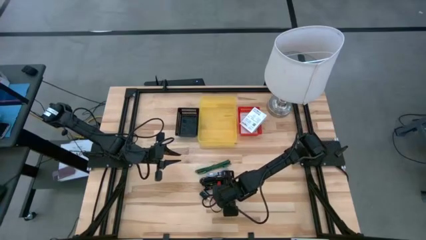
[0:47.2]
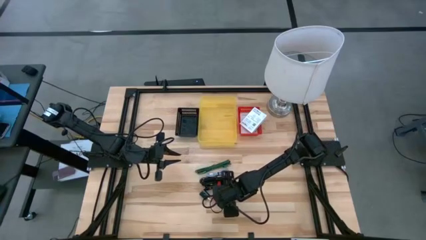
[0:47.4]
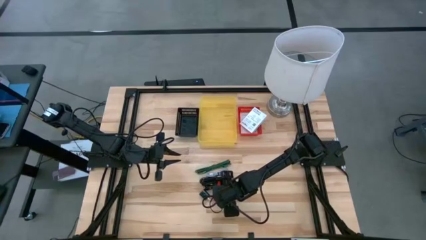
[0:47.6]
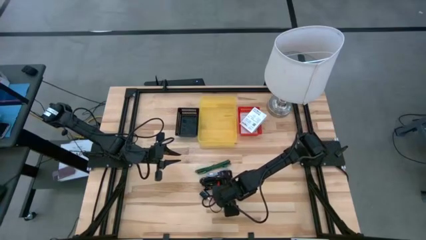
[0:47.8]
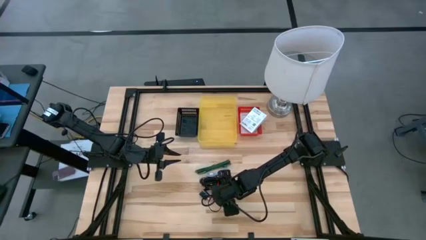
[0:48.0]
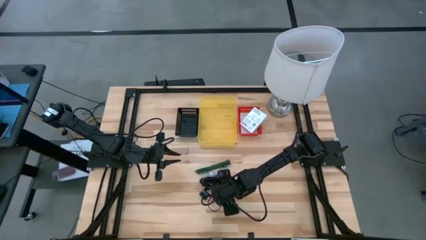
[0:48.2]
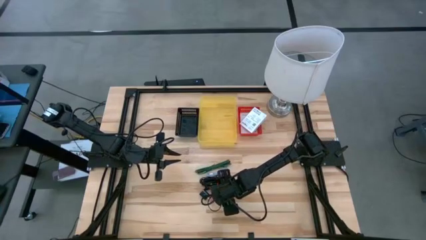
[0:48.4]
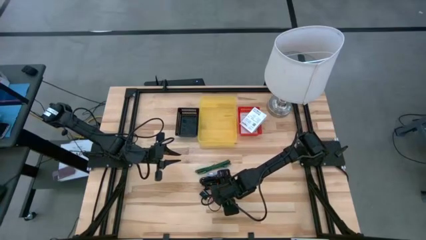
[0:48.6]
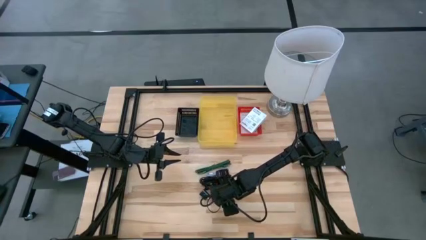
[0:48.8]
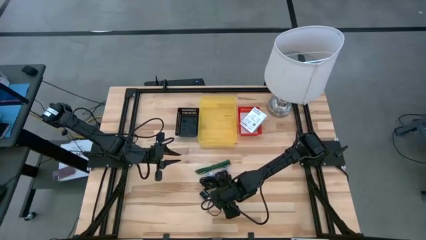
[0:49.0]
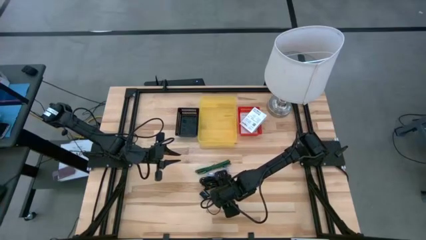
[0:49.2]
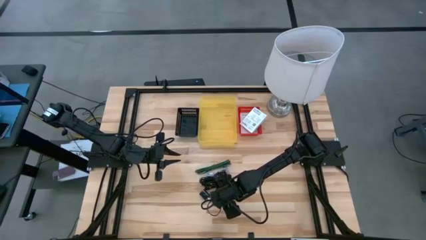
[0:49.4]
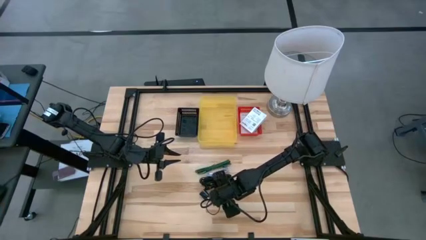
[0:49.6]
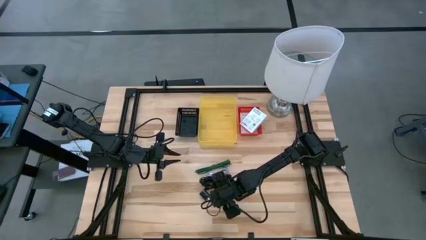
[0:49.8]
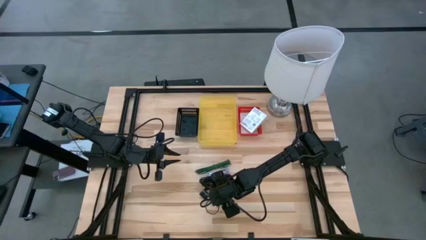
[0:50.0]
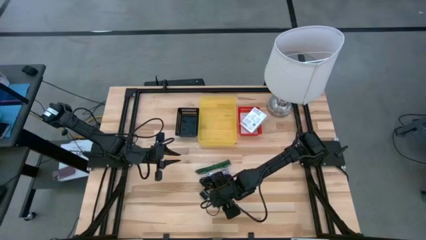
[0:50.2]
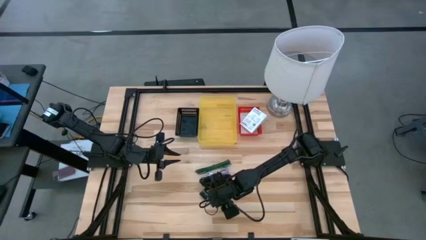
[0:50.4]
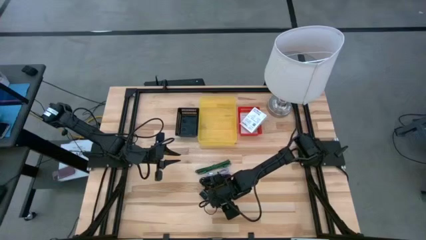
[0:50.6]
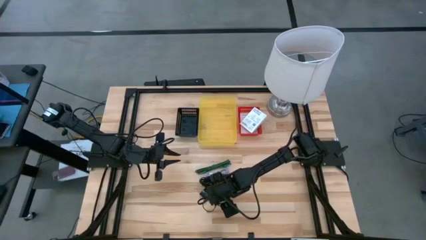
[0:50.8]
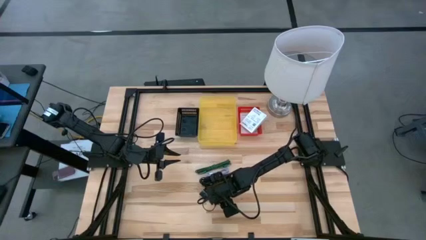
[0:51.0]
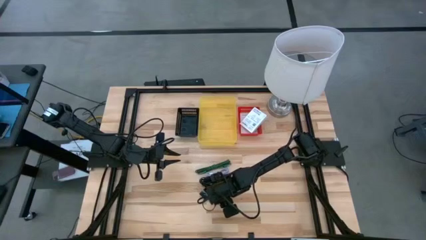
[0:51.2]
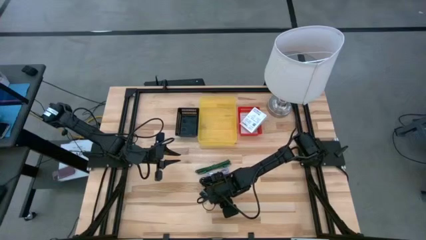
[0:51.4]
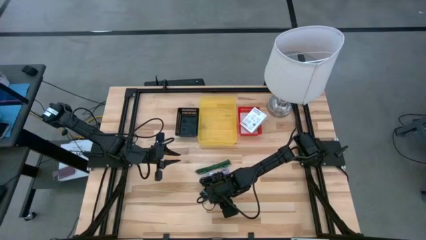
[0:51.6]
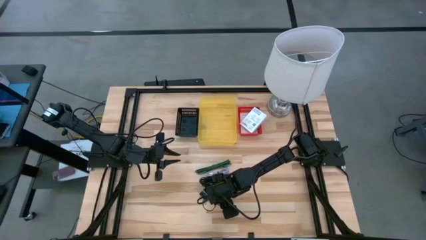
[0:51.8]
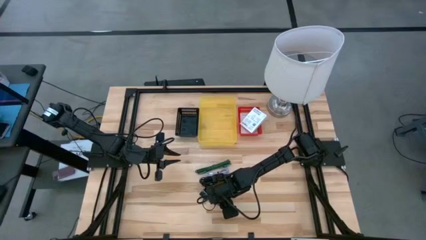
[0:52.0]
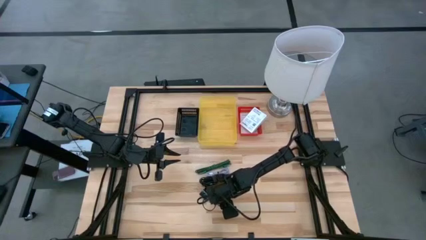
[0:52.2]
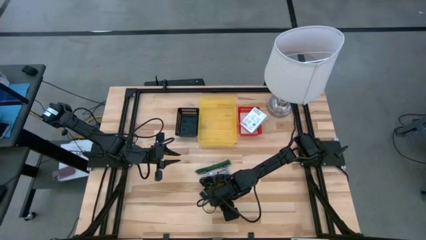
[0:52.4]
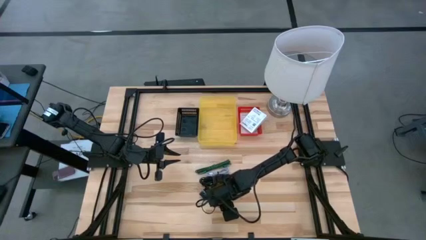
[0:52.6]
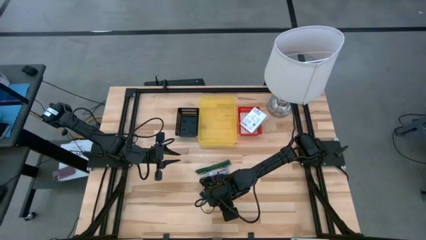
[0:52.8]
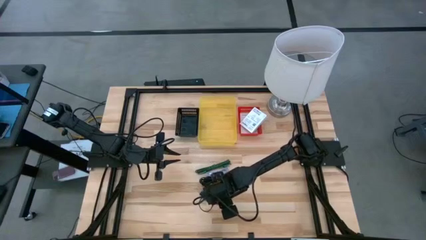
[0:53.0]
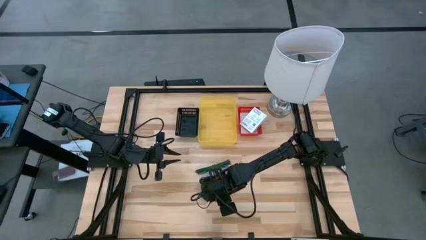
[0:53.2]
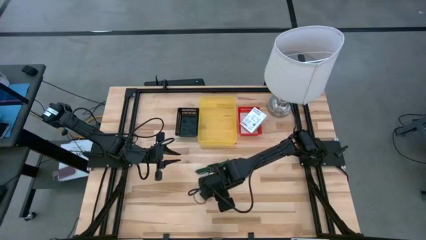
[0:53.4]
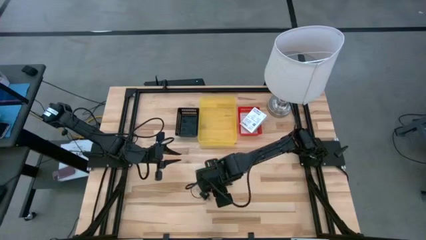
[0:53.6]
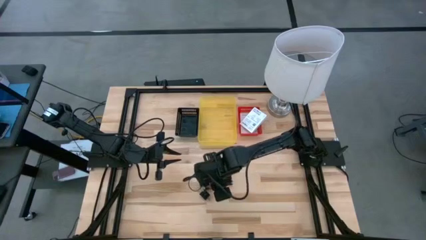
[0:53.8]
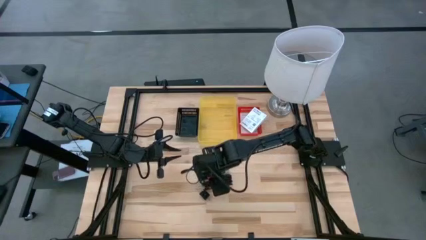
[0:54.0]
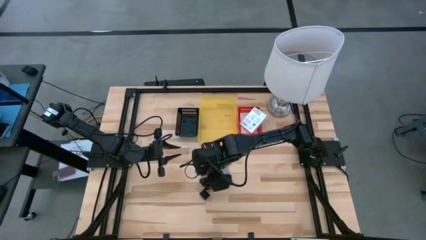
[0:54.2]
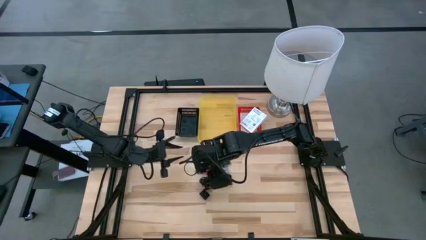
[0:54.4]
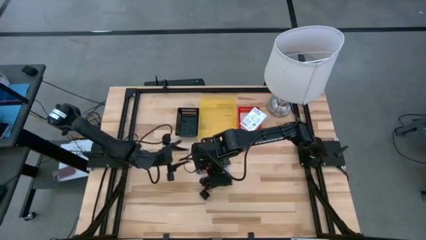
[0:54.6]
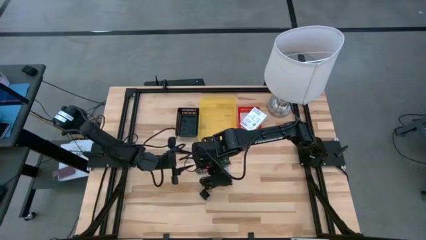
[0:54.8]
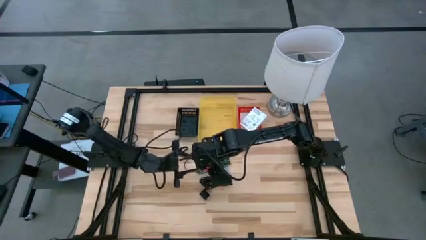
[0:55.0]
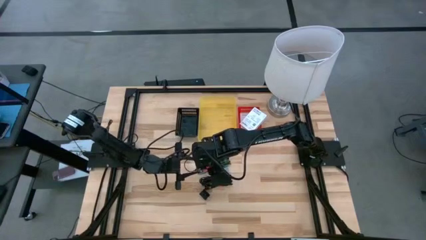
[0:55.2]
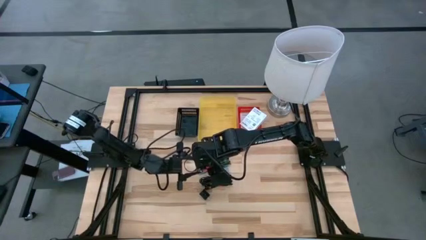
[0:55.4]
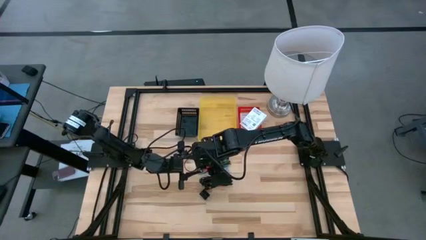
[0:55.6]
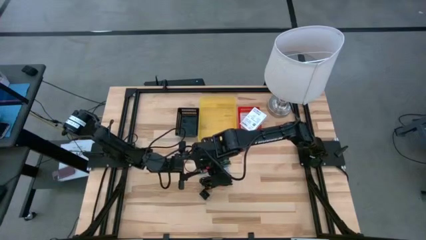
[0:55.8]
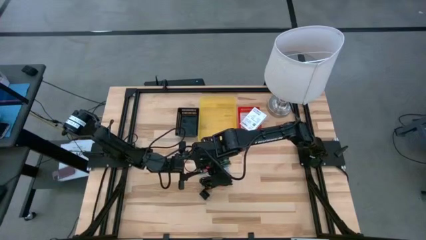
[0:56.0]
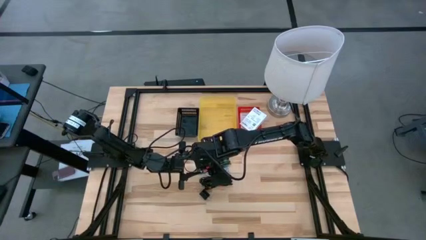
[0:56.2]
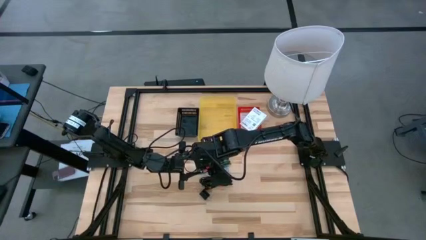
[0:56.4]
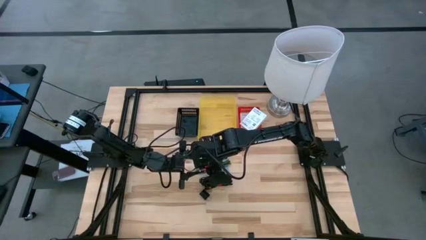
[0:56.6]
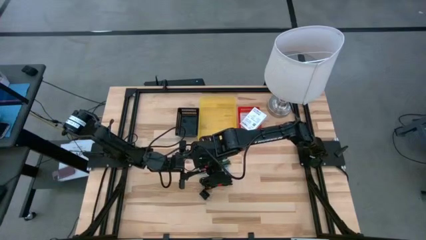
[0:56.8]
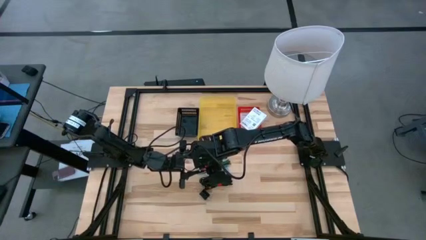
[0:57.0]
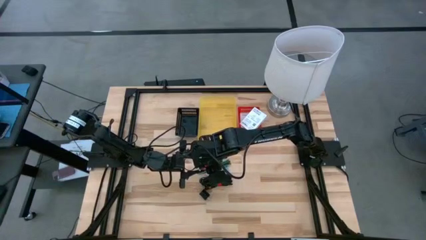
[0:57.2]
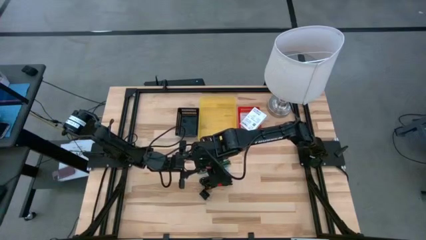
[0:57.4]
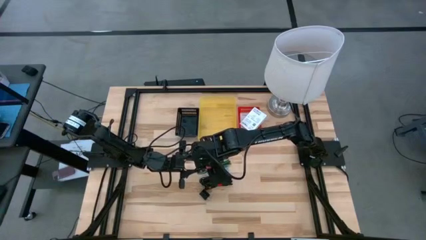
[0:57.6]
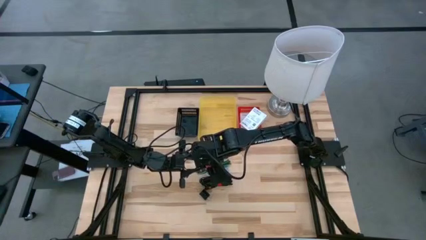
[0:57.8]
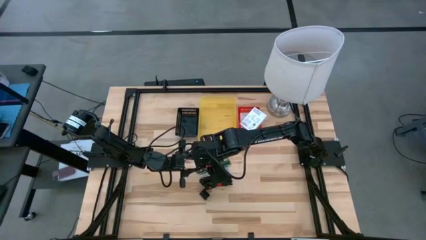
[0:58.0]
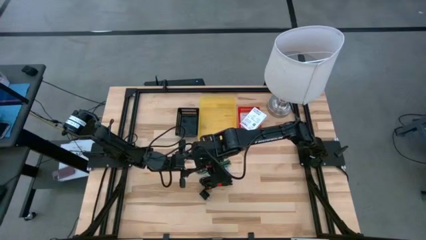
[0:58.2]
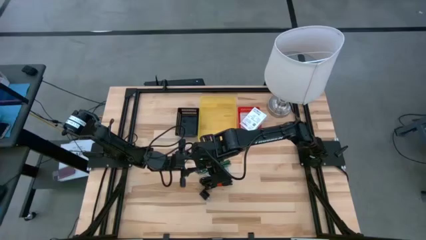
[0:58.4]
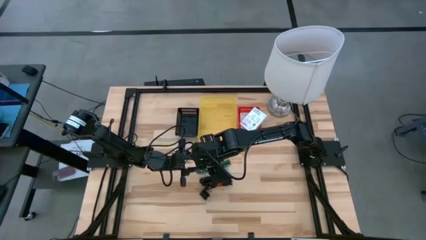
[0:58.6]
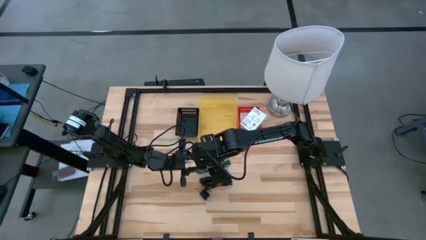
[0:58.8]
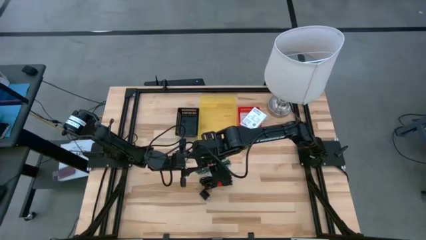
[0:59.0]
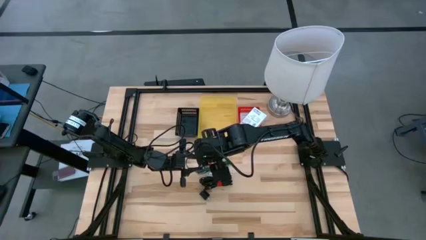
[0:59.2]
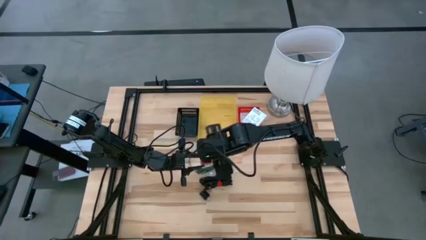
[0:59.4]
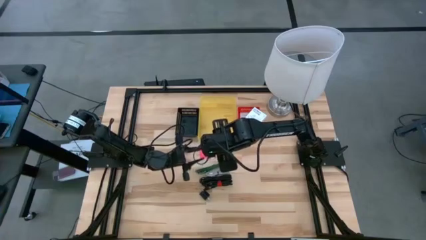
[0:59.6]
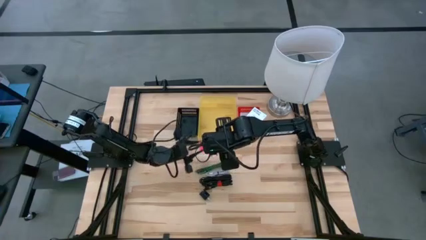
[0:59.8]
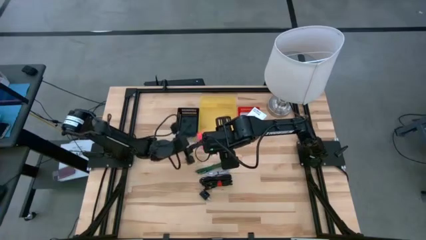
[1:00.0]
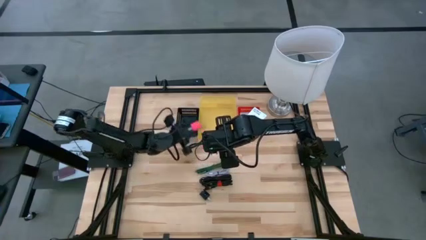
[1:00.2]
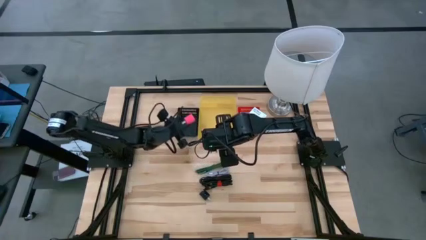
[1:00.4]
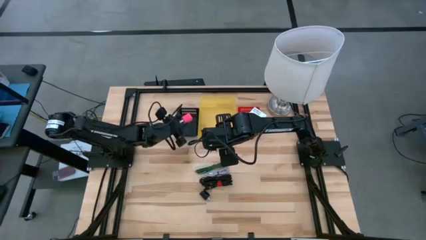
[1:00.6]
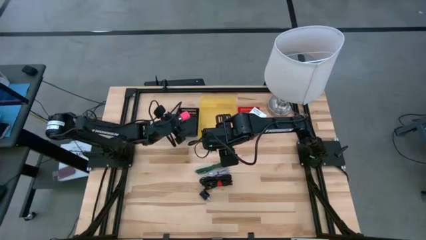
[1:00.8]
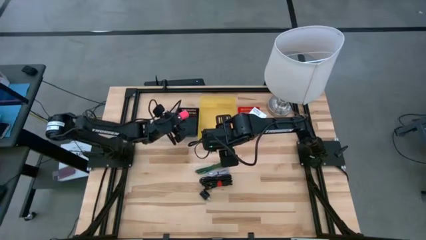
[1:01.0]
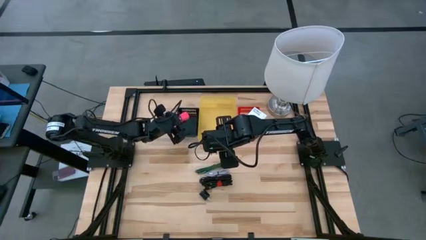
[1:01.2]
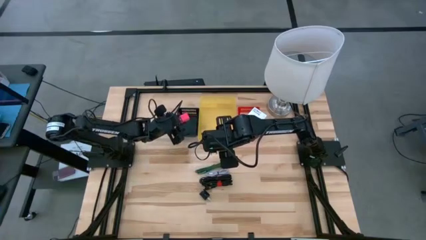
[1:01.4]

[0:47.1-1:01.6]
Task: Pick and place items into bin
Put the pink charger adapter into the black bin
